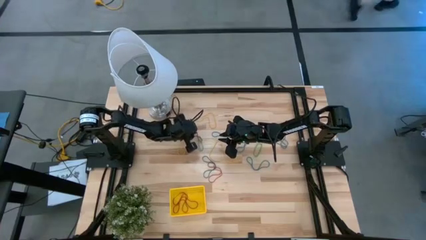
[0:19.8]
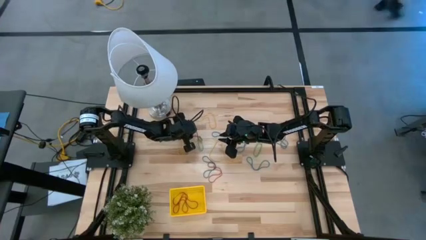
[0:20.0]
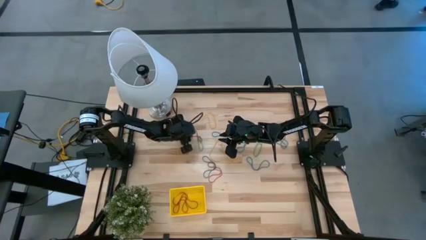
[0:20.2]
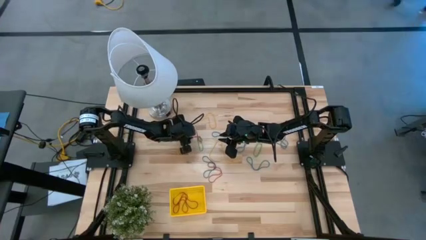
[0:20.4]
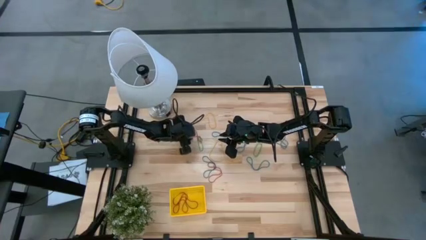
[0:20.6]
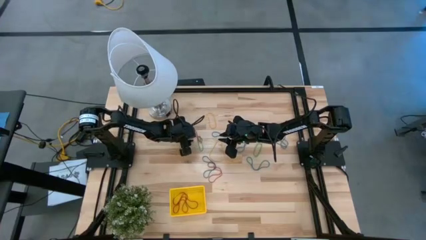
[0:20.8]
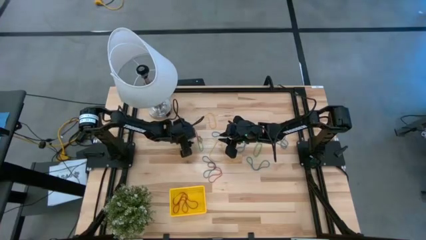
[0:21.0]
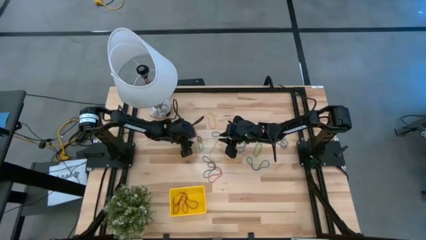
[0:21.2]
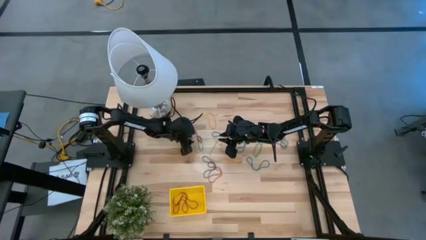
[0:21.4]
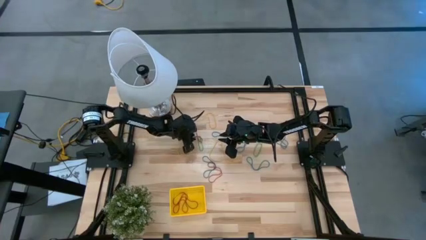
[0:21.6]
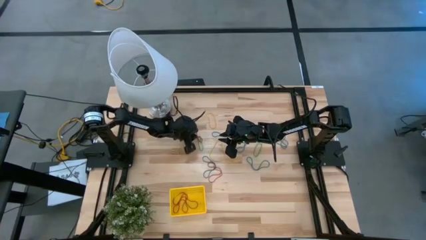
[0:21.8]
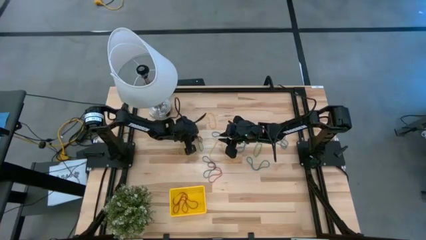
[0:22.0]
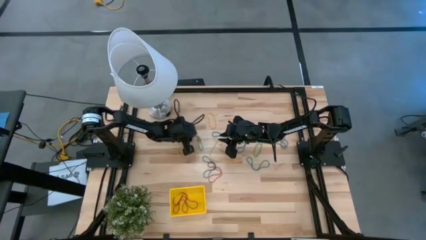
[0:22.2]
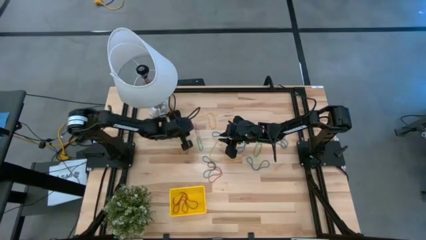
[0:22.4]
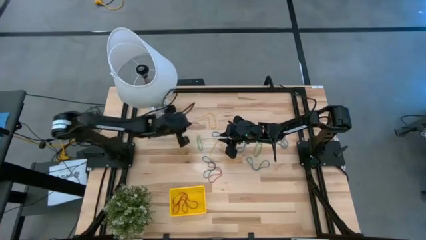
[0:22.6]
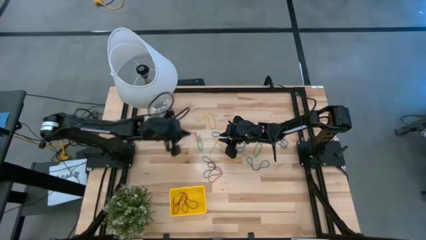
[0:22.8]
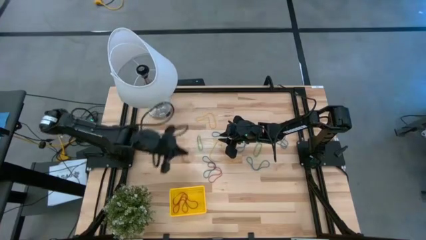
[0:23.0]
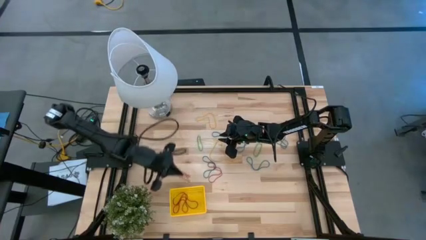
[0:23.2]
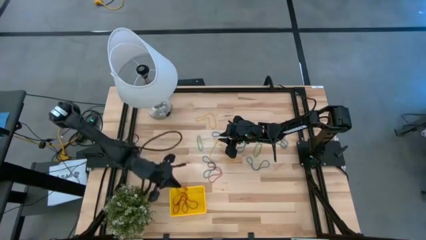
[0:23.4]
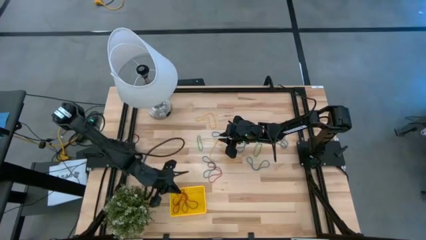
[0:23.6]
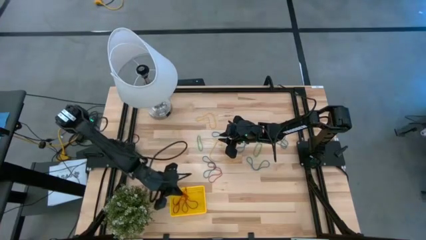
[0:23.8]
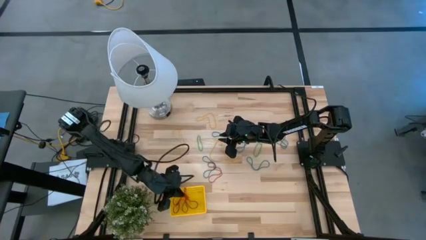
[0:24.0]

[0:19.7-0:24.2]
Task: Pick and place items into bin
Put the red rubber band into the yellow bin

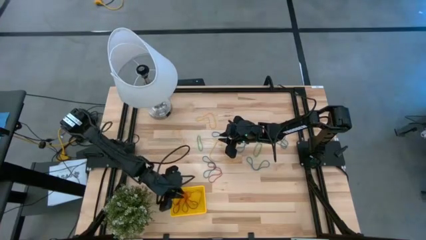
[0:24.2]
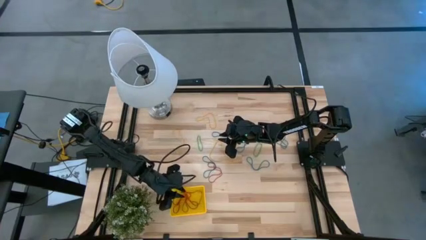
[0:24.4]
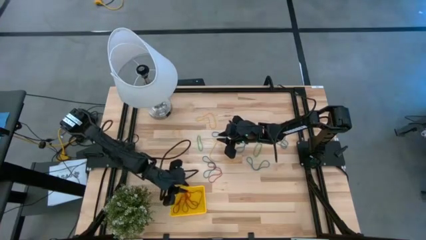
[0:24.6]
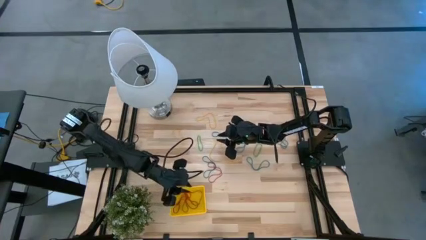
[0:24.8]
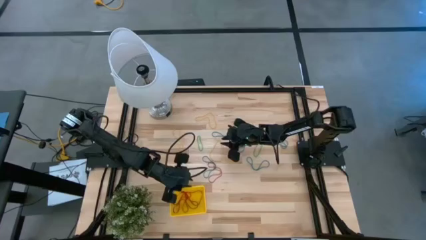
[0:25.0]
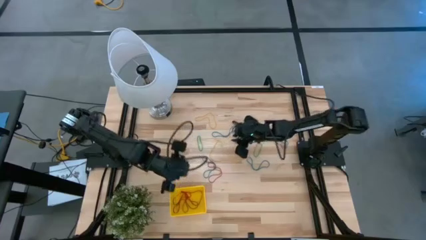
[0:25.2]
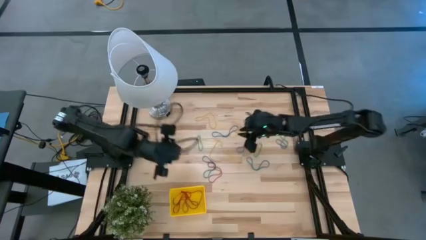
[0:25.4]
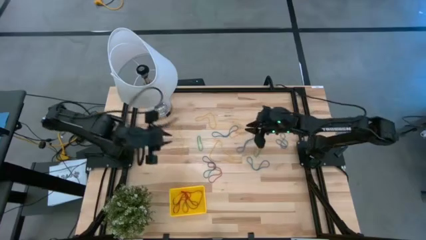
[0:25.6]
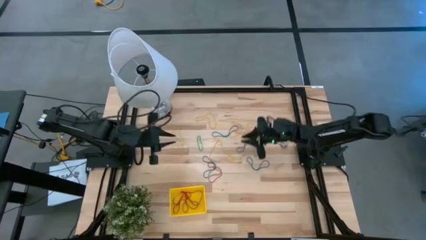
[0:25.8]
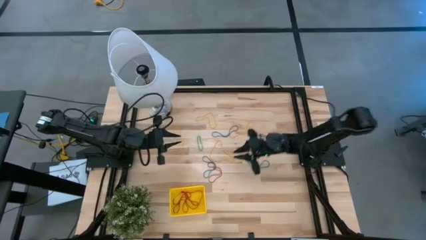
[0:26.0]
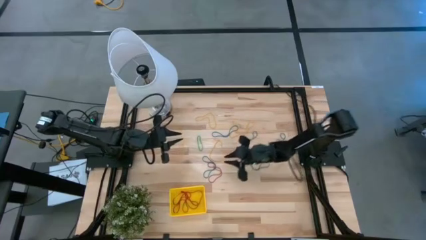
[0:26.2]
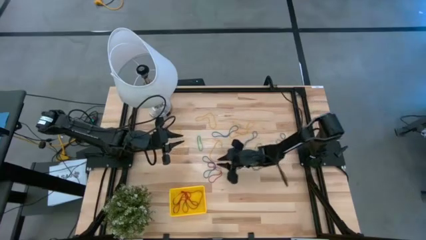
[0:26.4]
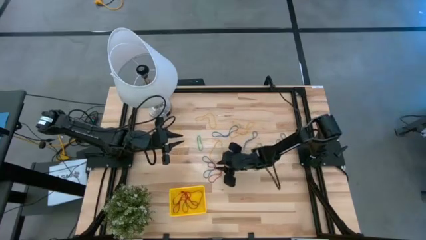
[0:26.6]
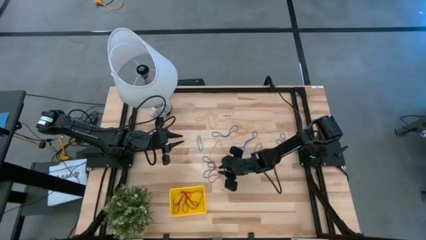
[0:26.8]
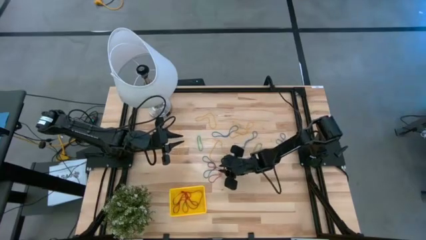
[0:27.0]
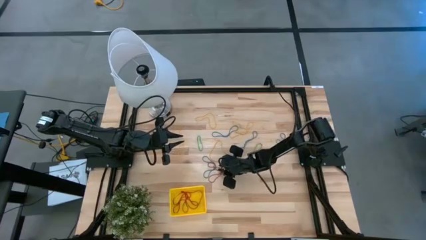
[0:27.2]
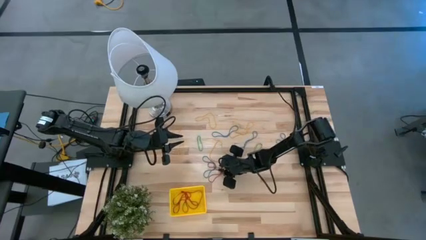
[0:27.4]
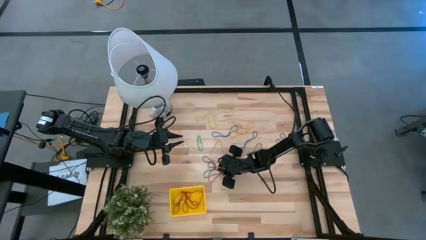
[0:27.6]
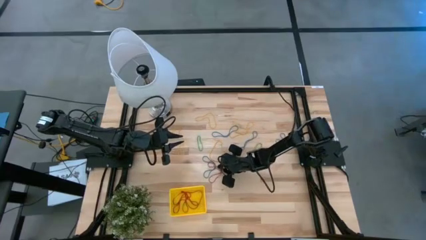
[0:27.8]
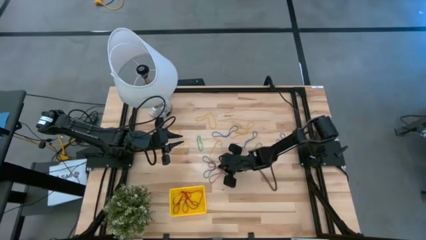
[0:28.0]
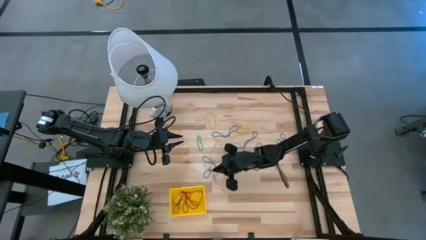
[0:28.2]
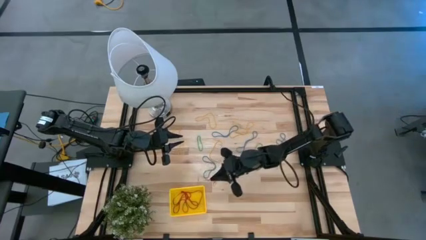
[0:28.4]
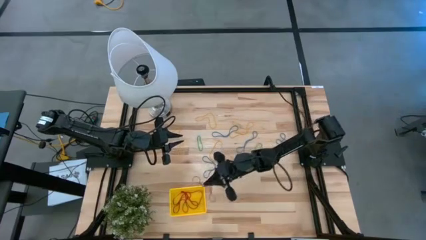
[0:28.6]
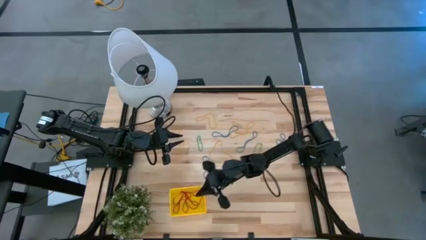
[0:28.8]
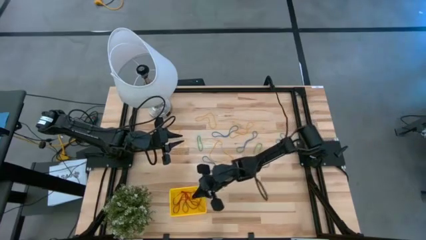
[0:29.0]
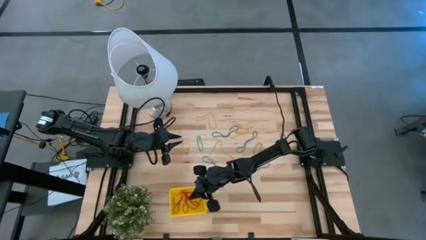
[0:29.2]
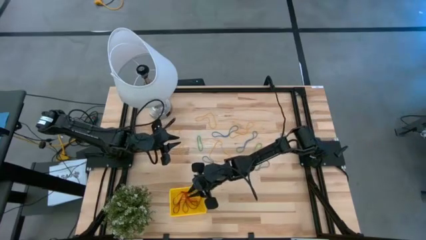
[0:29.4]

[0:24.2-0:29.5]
Put the red rubber band into the yellow bin

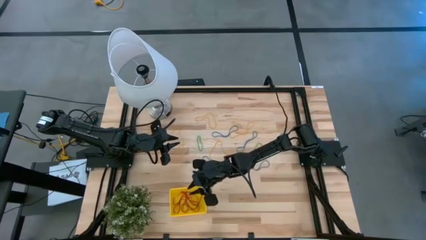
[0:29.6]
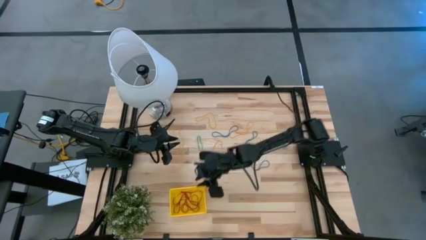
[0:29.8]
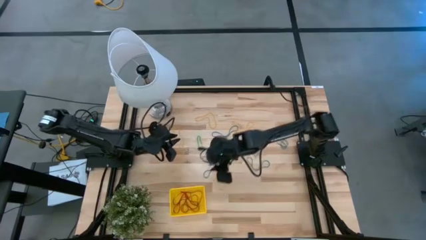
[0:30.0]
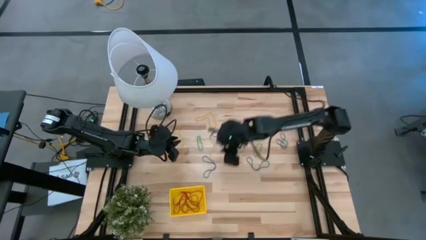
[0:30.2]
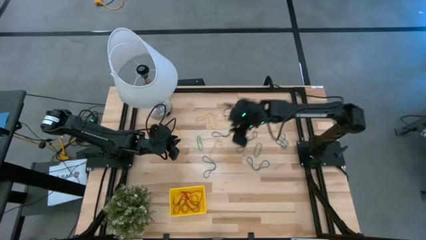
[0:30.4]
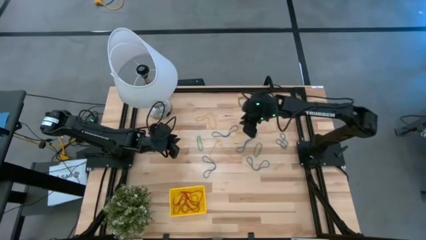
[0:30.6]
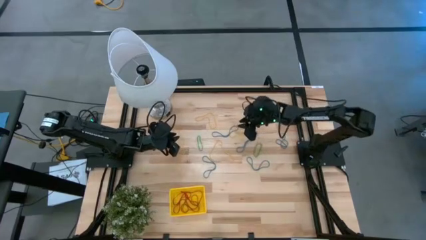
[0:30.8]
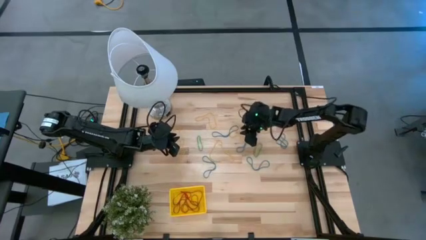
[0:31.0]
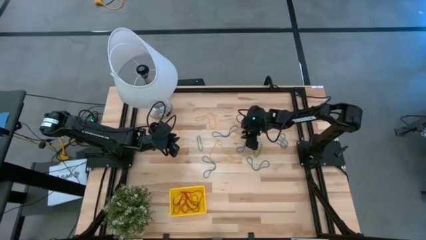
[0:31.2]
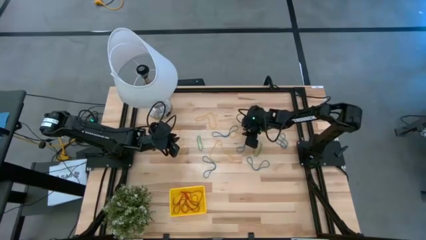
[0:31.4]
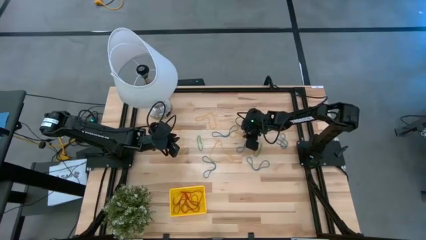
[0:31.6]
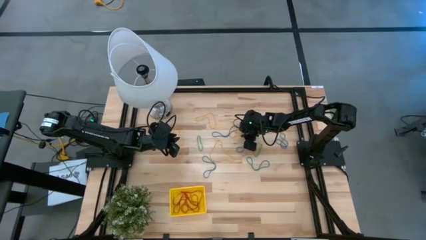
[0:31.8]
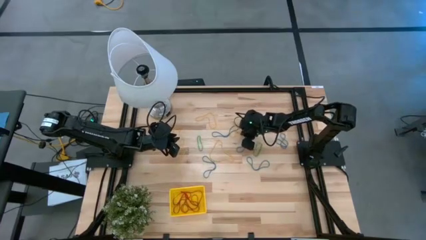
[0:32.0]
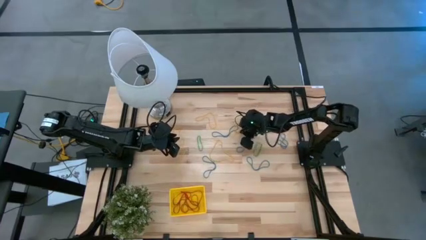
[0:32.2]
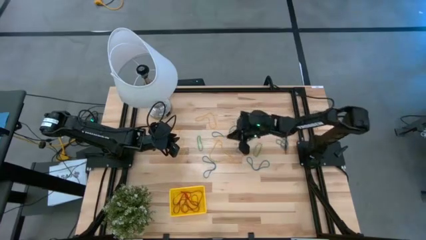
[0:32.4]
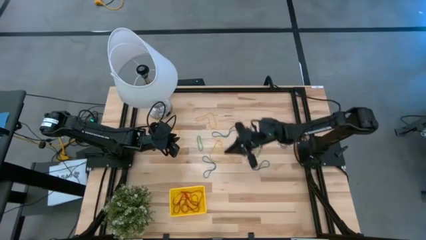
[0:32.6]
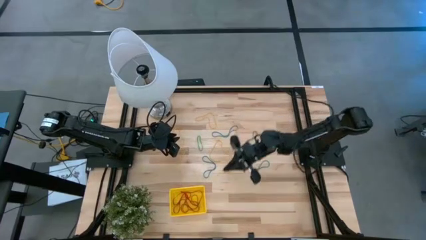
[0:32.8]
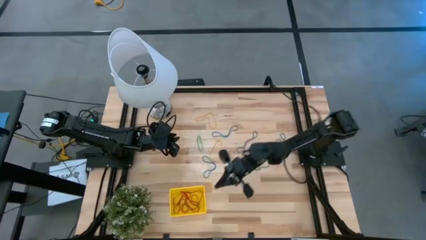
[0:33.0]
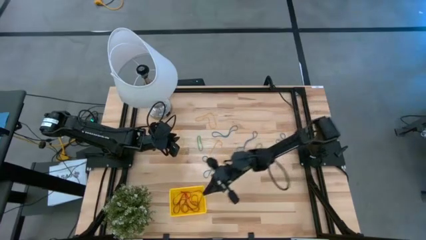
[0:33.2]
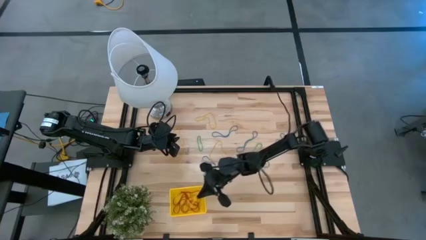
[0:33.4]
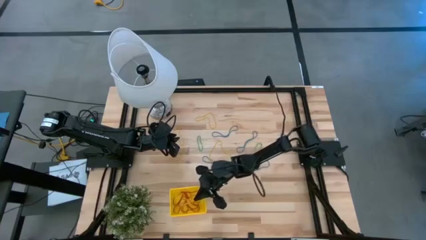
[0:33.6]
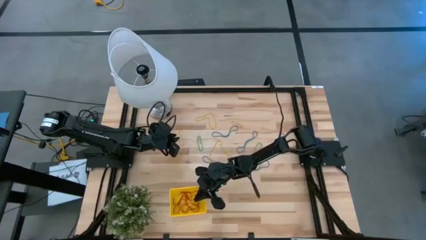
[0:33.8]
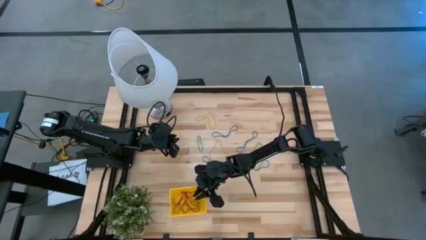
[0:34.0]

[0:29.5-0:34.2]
Put the yellow rubber band into the yellow bin

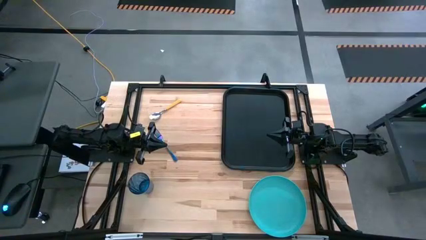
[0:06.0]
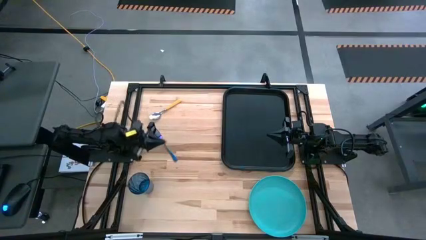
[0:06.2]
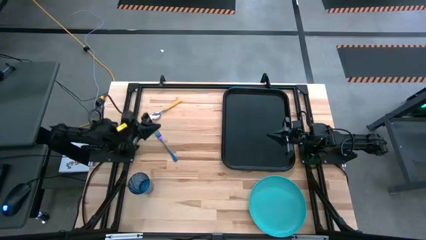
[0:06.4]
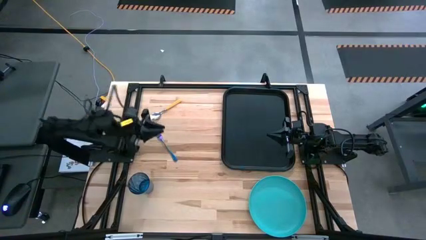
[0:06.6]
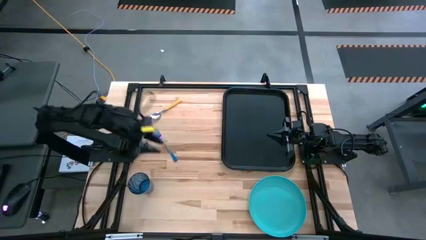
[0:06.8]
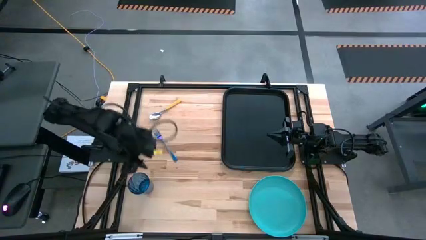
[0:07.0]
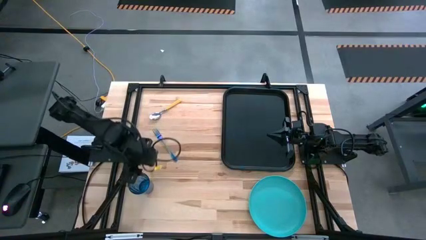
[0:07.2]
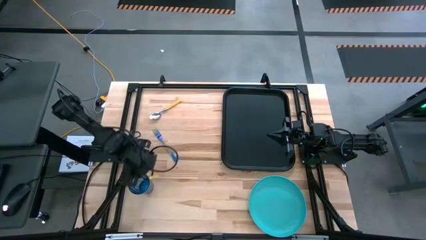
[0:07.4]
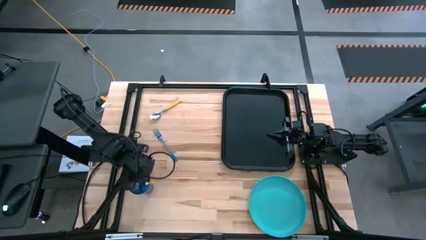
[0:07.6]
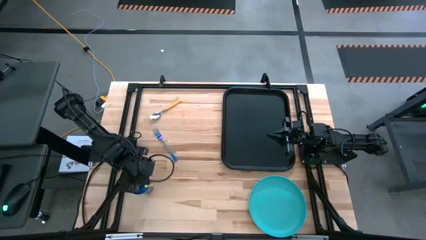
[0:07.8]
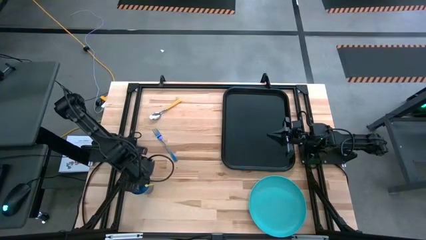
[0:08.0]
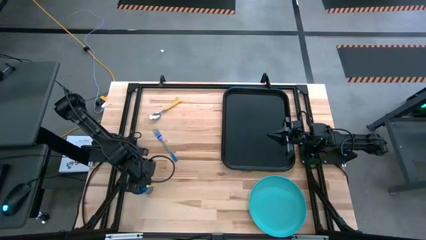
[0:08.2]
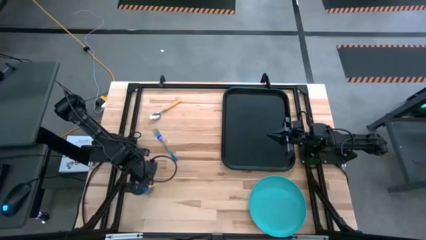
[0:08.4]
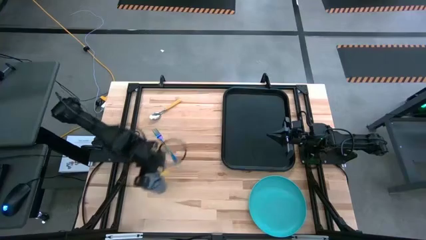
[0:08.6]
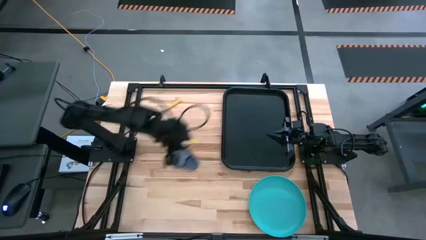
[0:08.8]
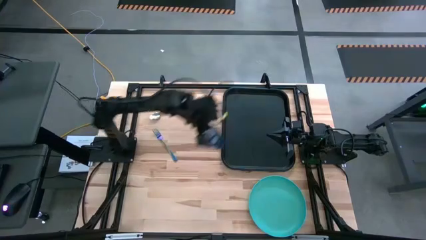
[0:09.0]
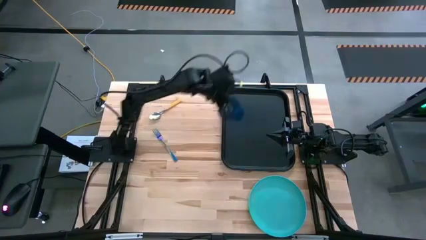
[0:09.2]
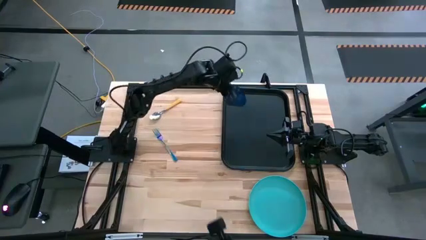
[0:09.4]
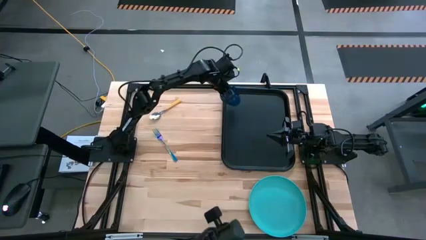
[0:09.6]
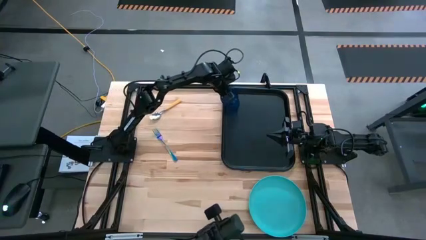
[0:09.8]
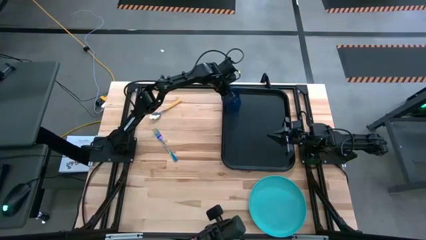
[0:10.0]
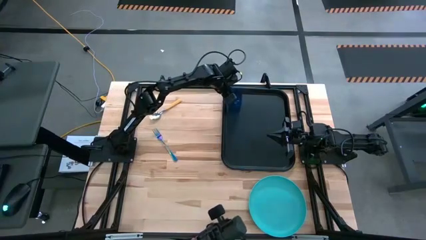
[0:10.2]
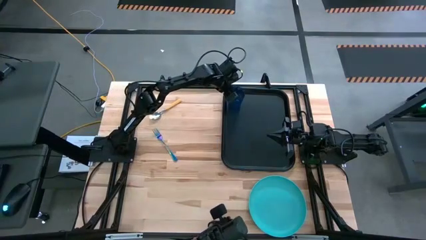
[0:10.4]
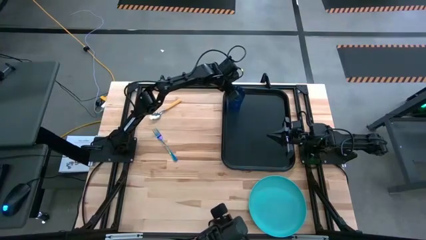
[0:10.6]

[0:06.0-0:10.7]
Task: Pick and place plate/cup/fork/spoon on tray
Put the blue cup on the top left of the black tray
